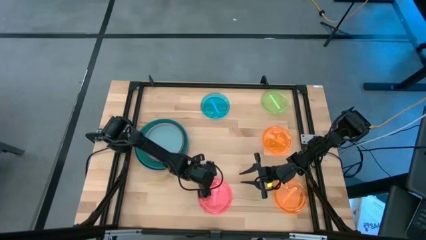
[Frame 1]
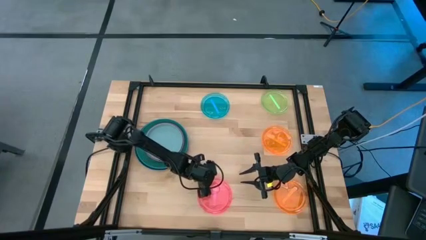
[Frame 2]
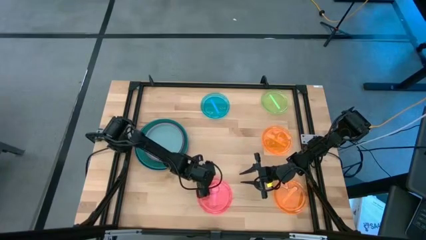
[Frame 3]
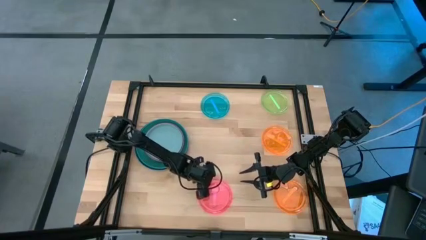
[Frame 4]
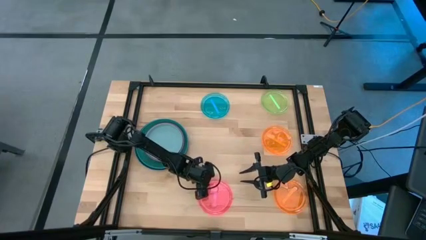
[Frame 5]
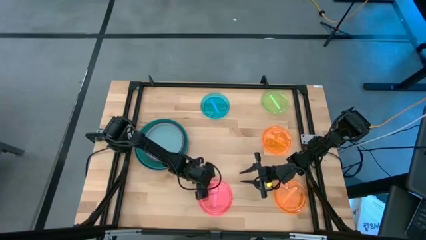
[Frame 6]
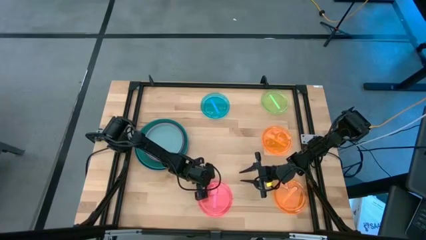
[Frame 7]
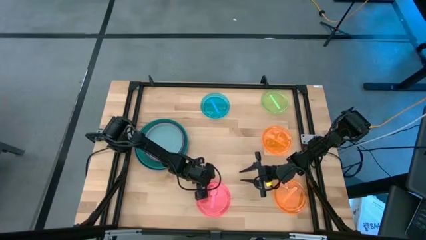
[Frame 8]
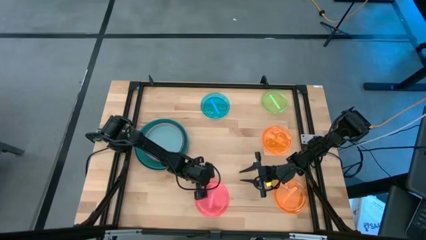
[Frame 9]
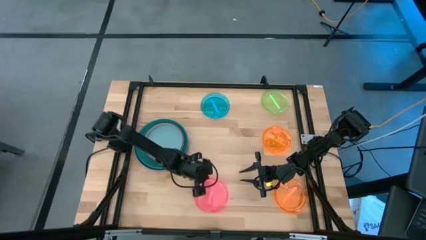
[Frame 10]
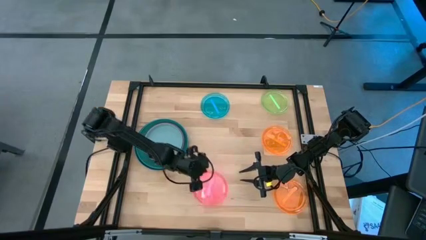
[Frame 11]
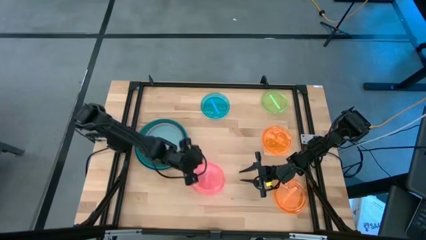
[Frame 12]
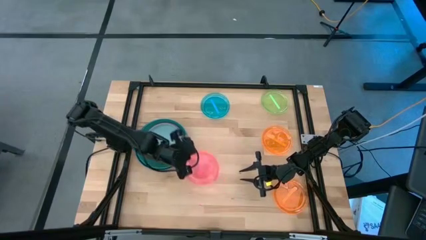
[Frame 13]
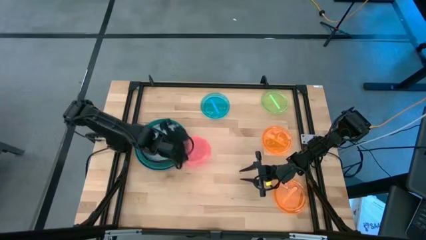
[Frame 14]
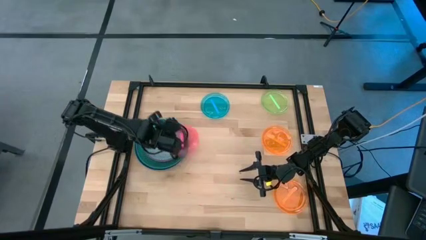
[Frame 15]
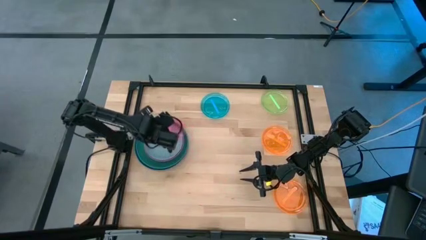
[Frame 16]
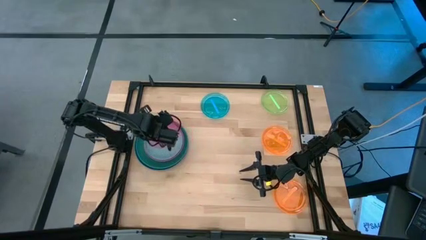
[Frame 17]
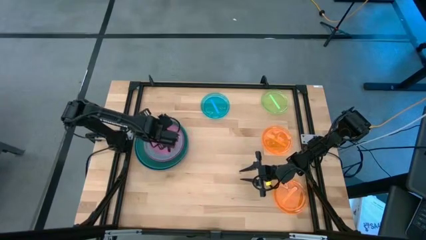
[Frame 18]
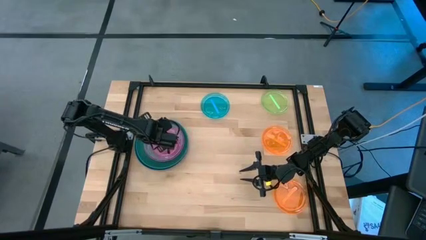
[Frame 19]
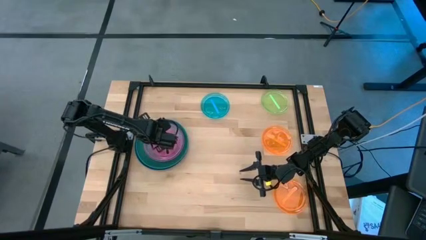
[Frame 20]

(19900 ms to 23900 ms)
Task: Stack plastic plates
Stack the pink plate on top of the gray plate

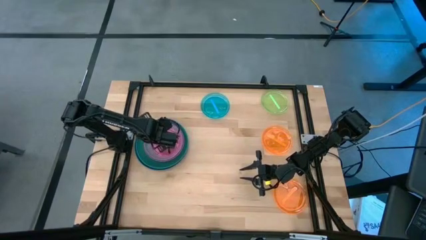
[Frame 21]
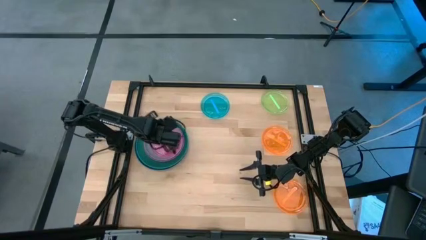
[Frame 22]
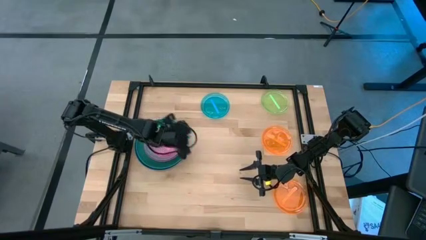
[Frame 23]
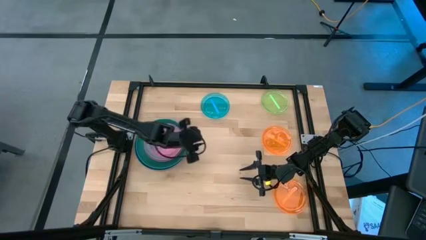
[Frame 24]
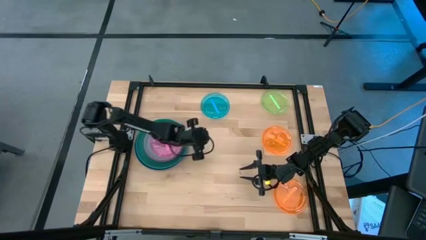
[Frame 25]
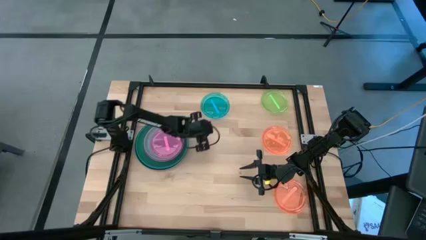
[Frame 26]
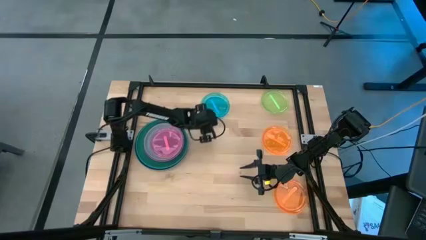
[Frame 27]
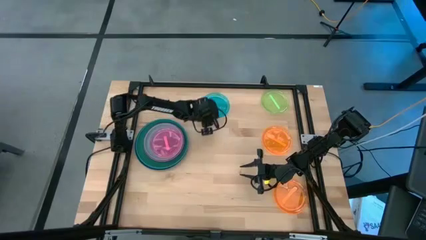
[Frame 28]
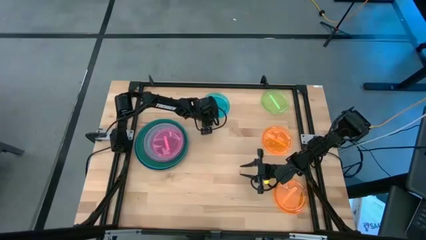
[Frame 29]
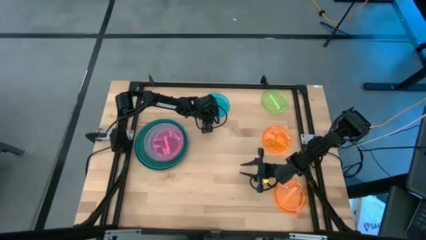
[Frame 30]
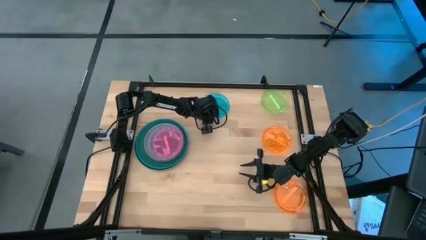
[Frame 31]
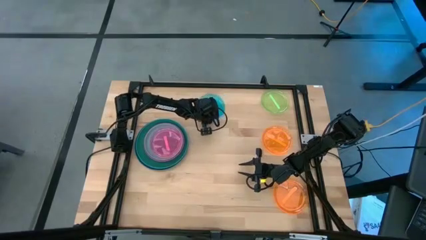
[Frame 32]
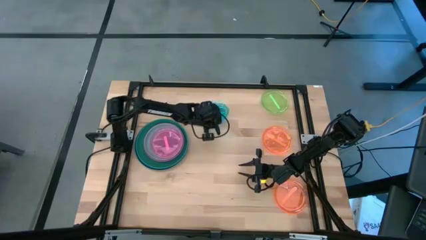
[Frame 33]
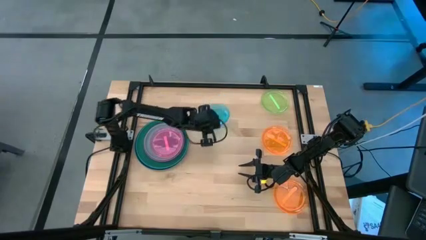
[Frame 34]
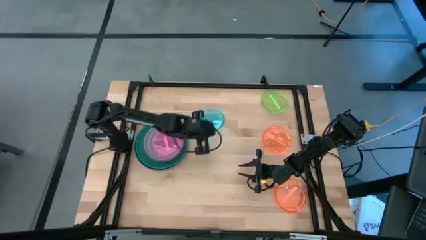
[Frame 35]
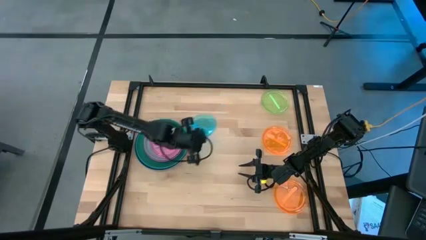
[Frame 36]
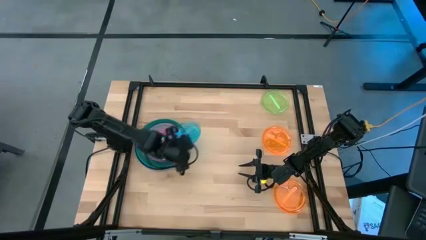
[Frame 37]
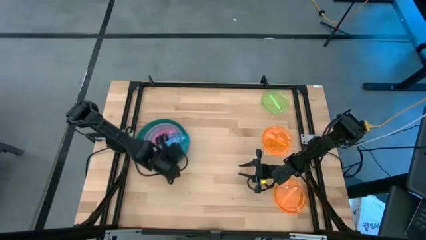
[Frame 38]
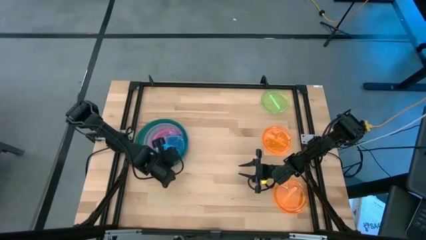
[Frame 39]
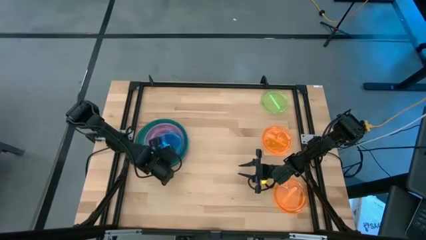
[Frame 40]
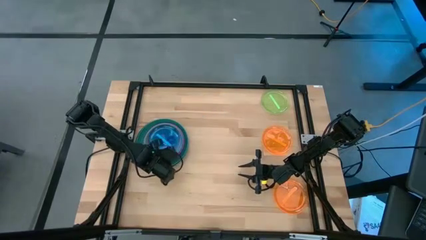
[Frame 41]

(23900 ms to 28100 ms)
Stack the blue plate on top of the pink plate

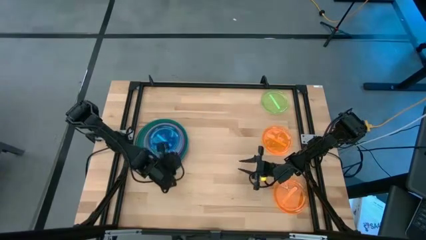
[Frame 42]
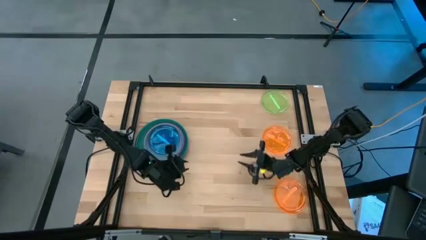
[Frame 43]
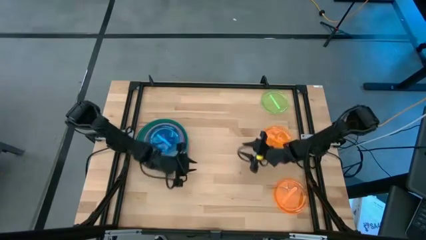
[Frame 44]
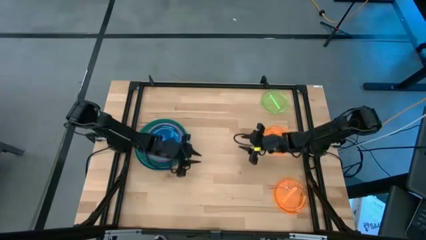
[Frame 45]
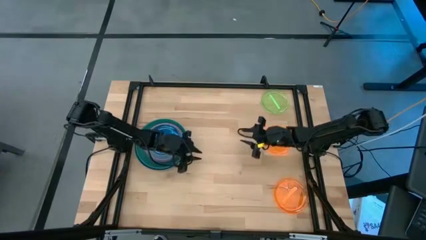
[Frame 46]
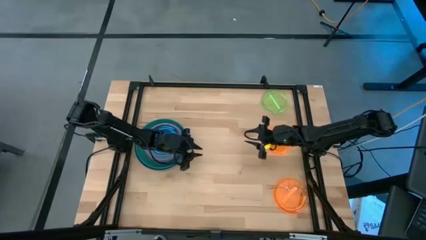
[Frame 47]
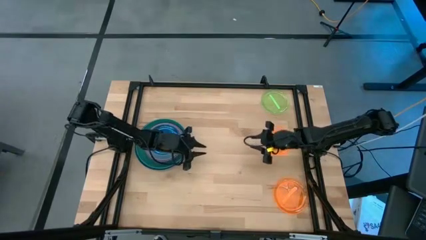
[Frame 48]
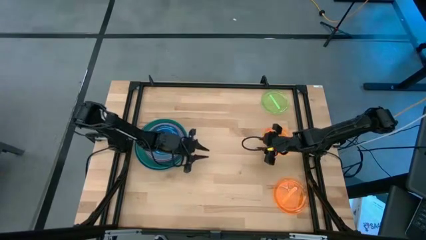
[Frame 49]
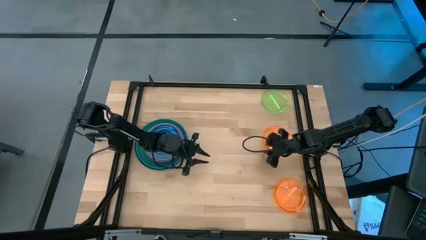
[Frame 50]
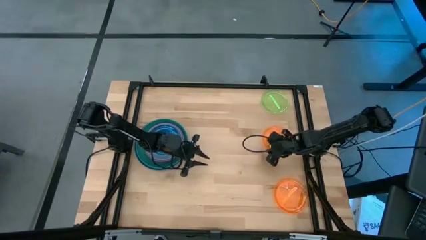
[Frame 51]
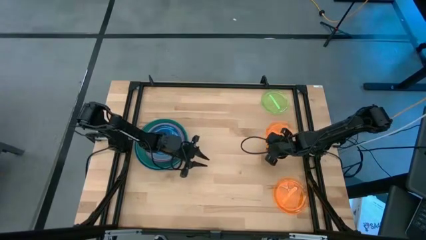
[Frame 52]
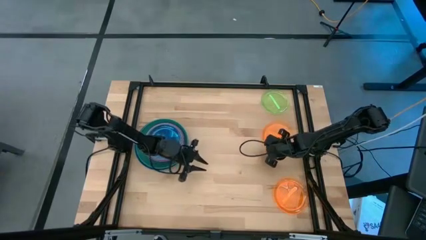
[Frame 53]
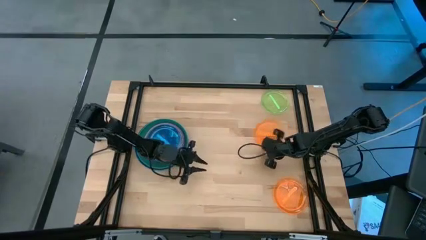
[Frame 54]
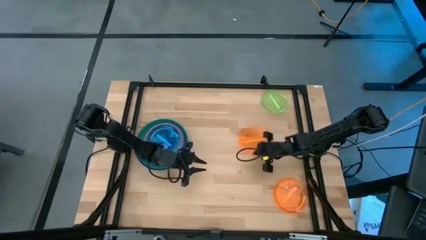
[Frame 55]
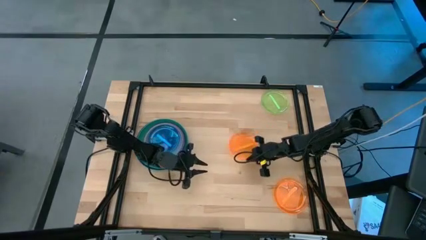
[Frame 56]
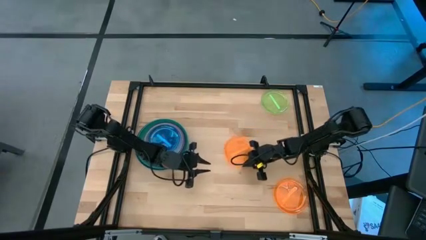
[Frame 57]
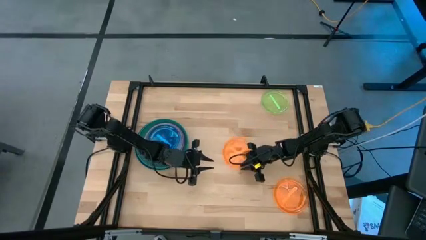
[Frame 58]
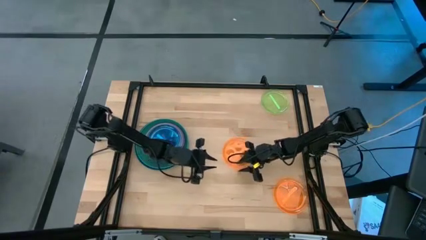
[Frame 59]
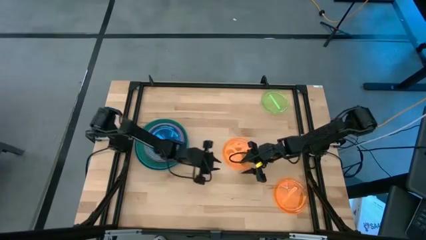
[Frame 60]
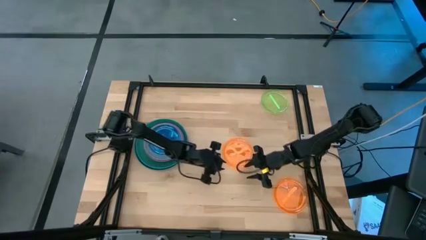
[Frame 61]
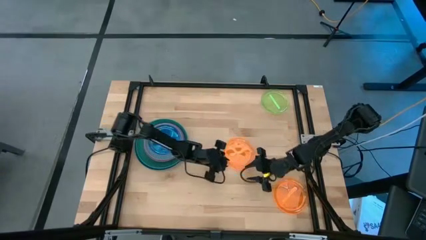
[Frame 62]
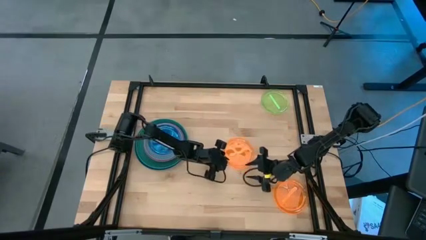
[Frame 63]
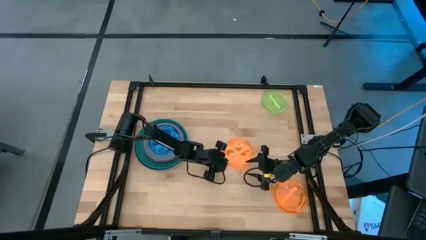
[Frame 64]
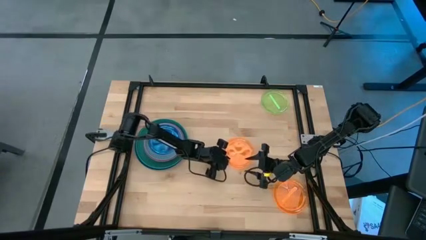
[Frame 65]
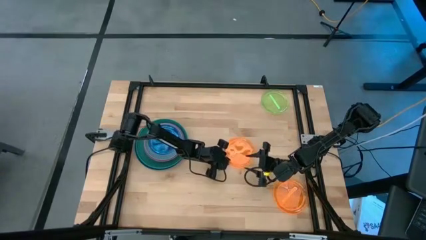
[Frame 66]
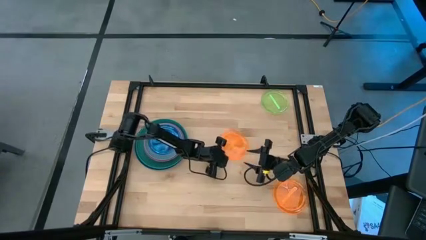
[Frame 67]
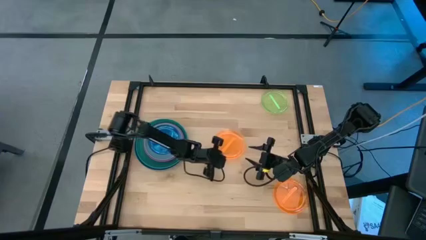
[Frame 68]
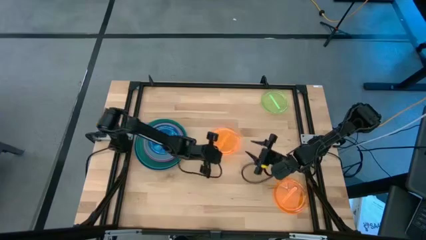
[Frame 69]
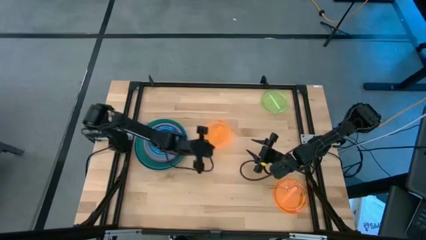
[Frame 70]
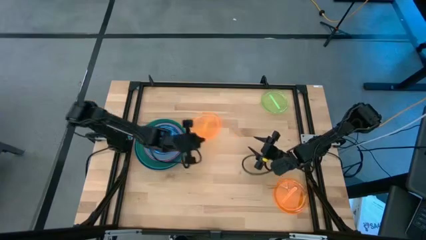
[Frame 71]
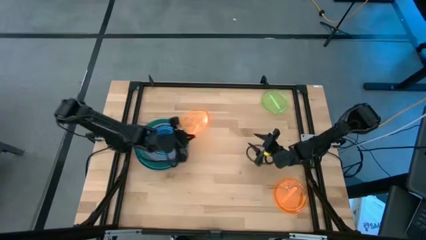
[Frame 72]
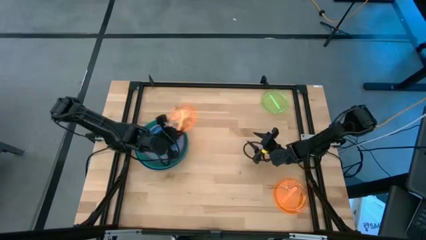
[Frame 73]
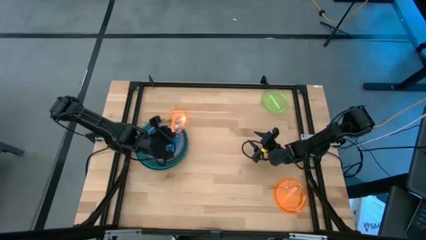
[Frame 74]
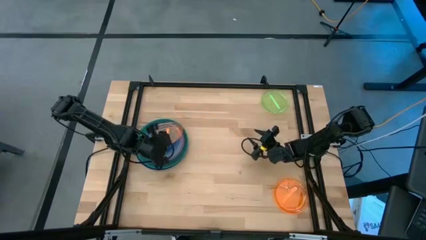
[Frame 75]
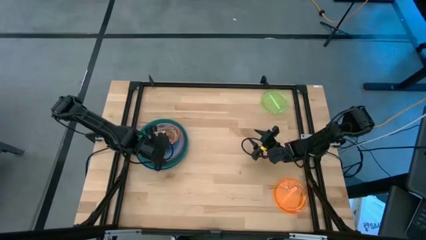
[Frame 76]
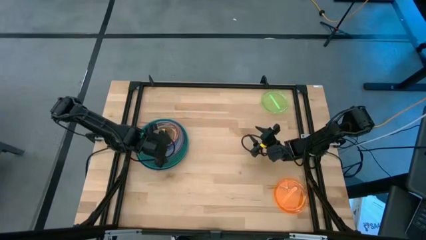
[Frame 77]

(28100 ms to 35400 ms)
Stack the top orange plate on top of the blue plate

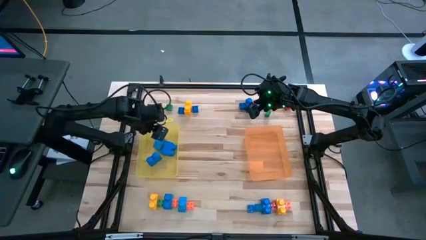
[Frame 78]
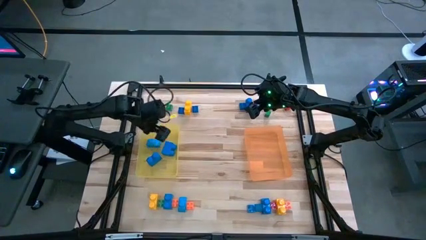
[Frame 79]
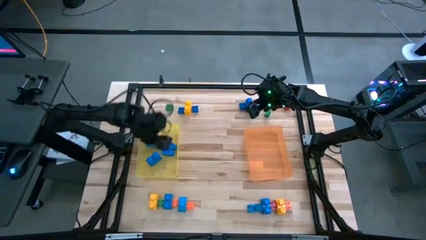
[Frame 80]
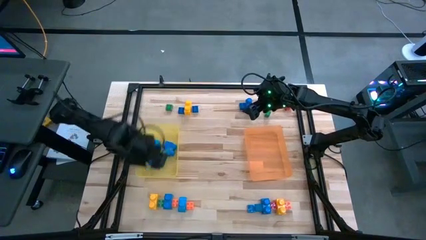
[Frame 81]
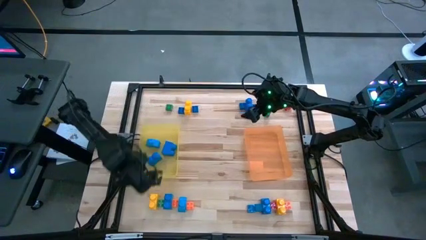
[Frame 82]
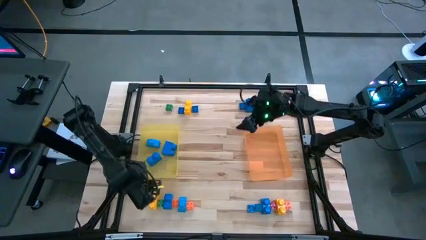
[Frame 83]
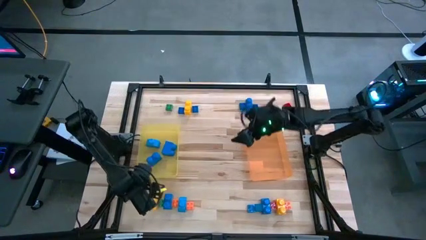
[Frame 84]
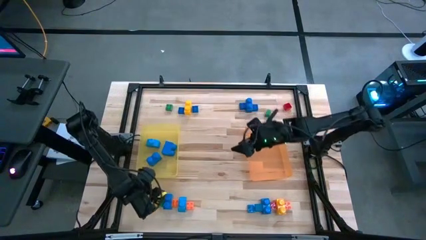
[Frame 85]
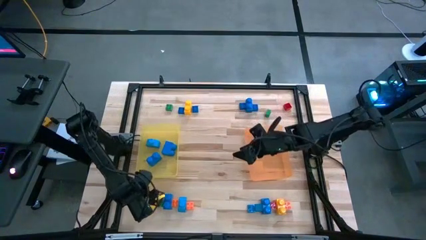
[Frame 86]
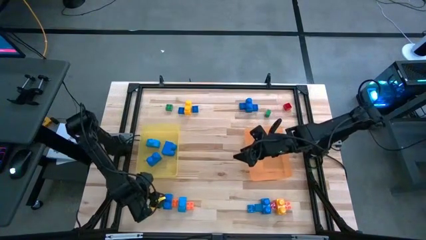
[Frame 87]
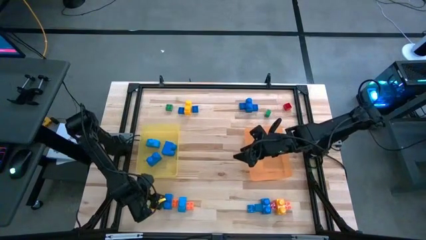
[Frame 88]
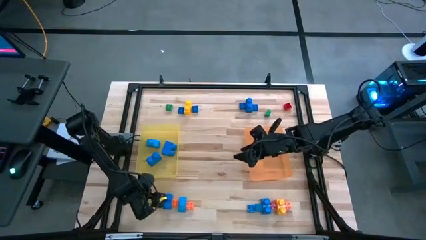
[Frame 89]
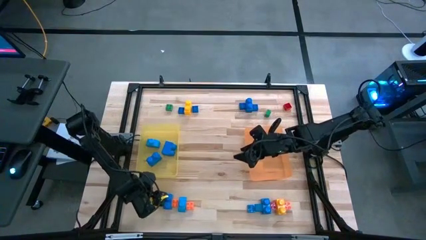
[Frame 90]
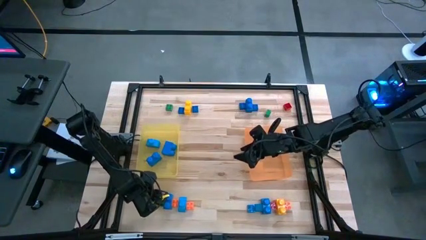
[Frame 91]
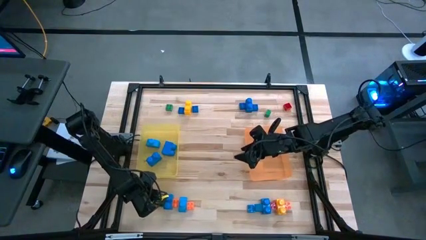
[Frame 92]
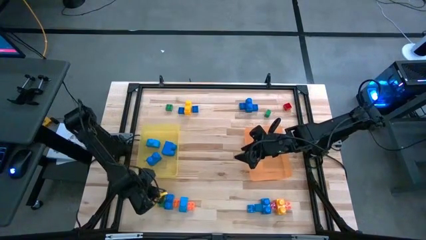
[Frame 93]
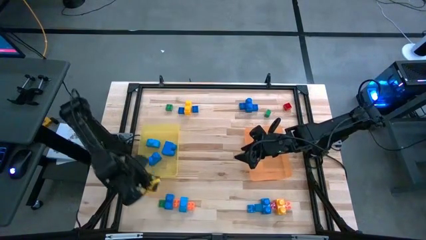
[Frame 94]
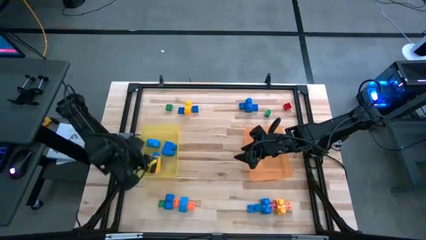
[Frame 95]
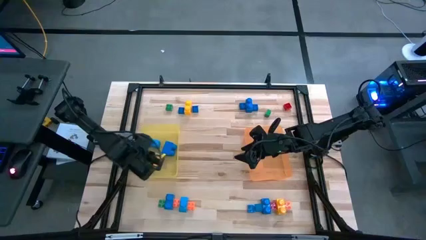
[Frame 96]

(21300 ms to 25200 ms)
Task: Sort blocks by size
Put the large yellow game piece into the yellow bin
